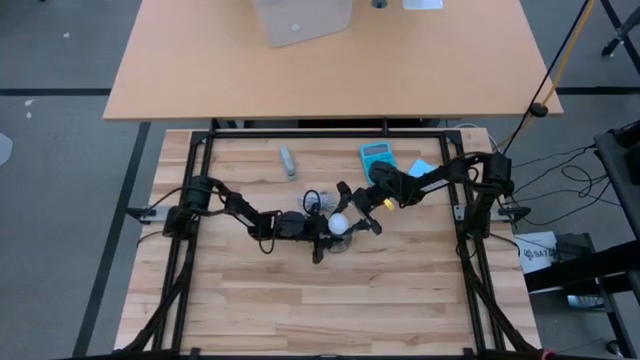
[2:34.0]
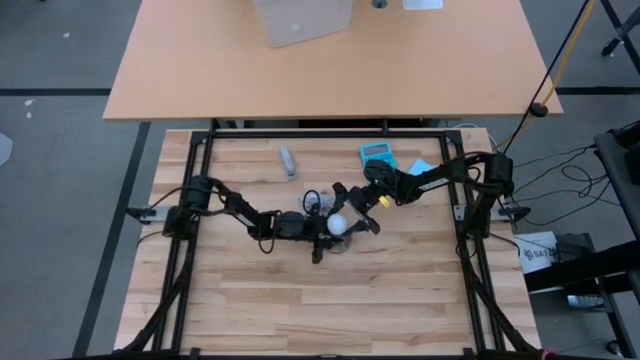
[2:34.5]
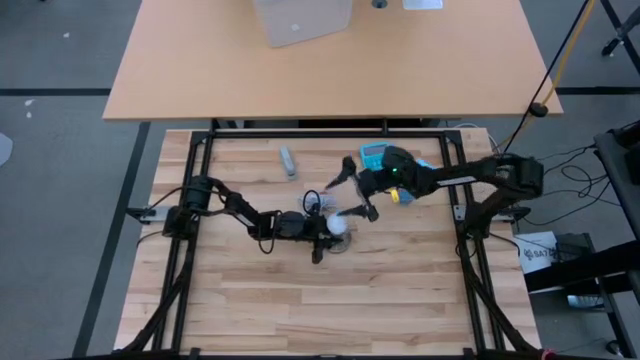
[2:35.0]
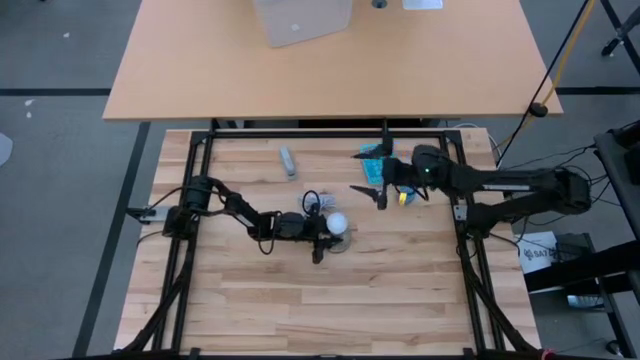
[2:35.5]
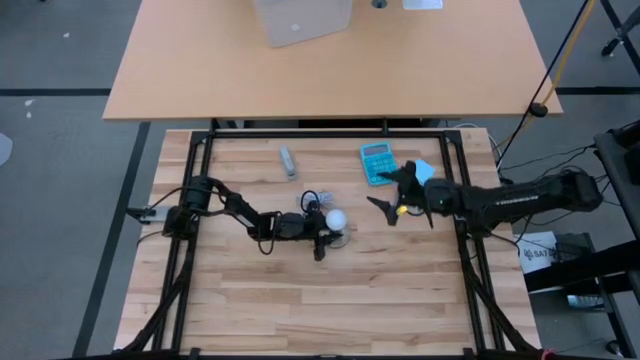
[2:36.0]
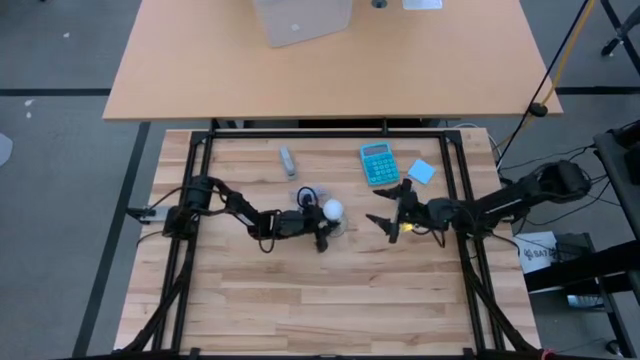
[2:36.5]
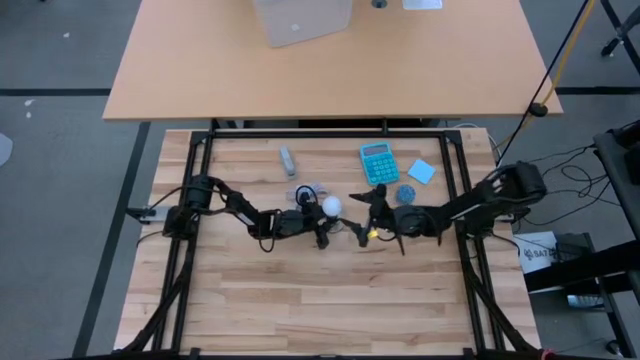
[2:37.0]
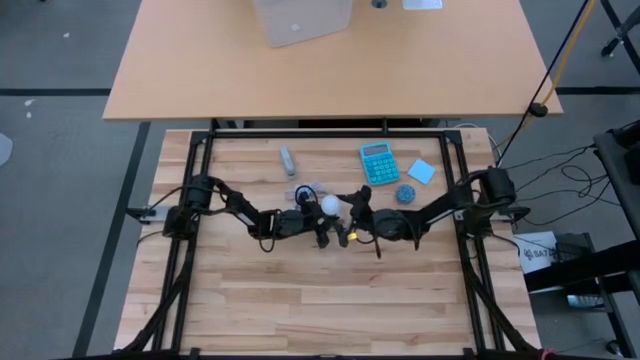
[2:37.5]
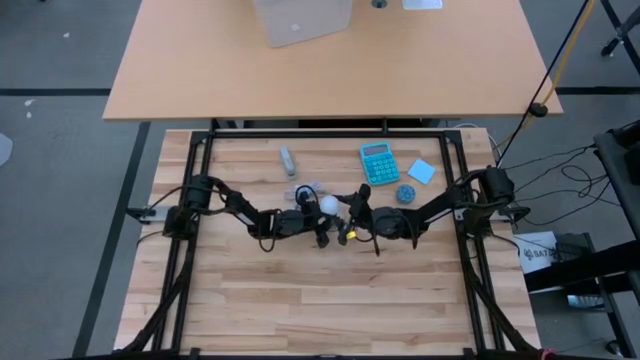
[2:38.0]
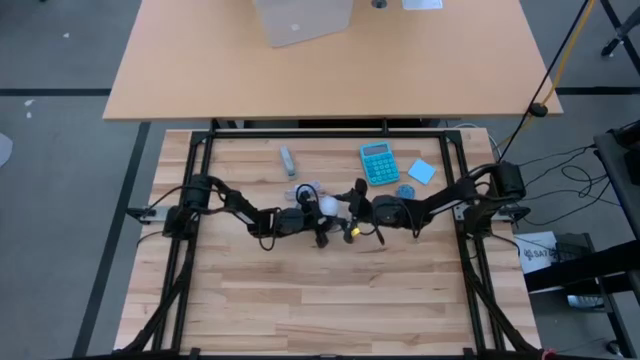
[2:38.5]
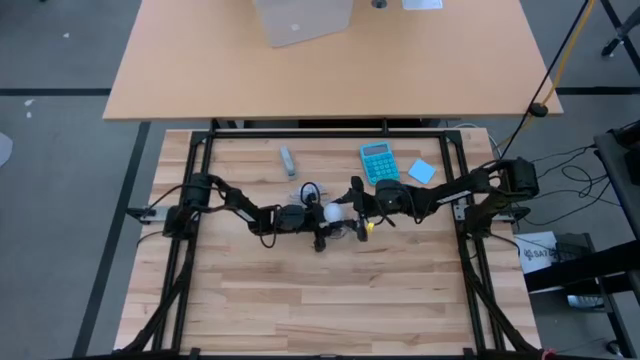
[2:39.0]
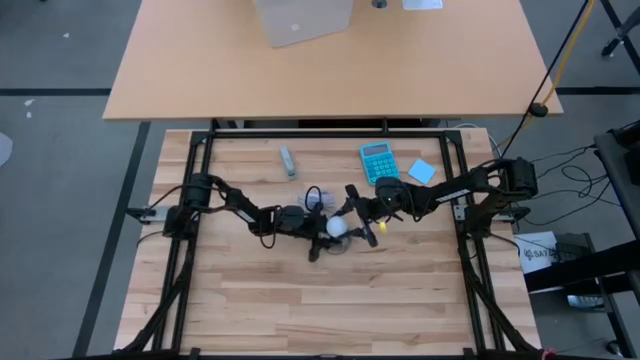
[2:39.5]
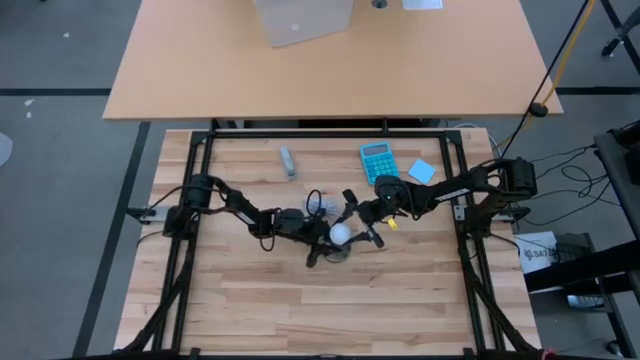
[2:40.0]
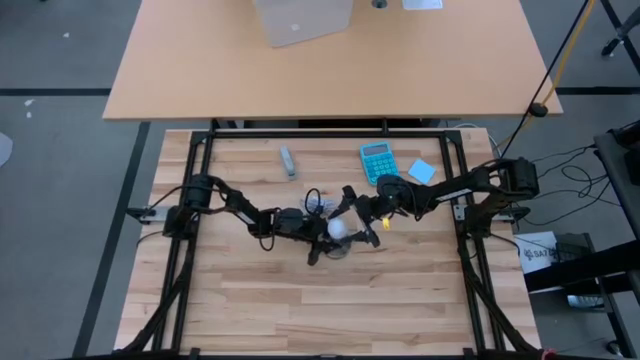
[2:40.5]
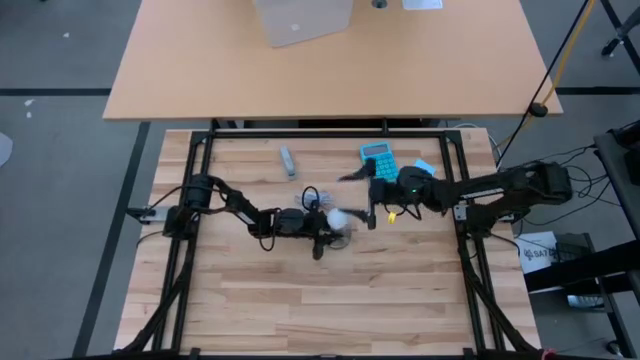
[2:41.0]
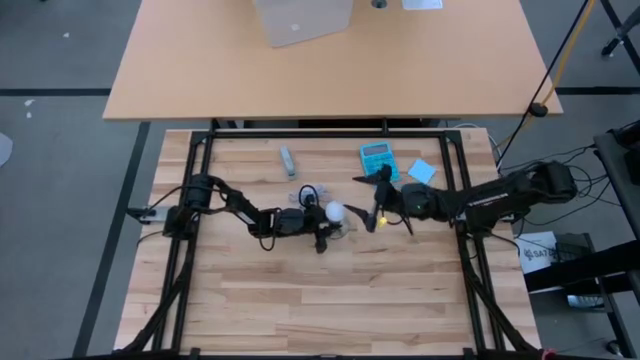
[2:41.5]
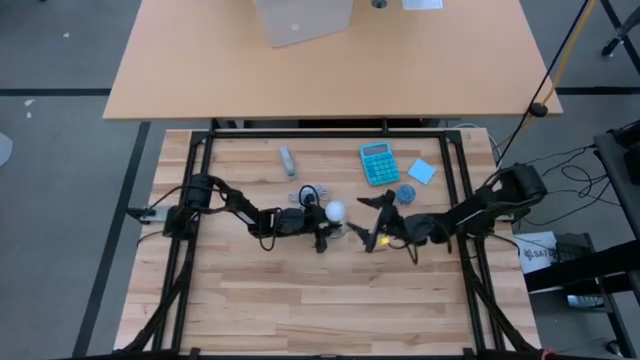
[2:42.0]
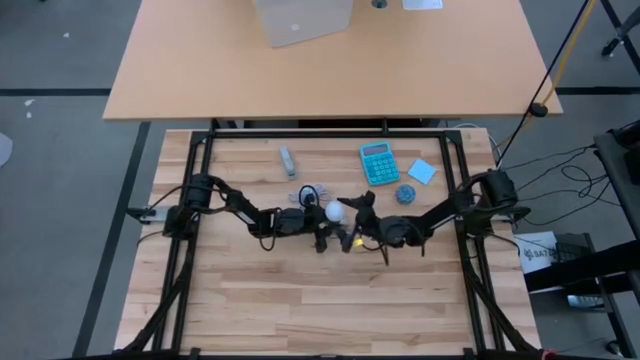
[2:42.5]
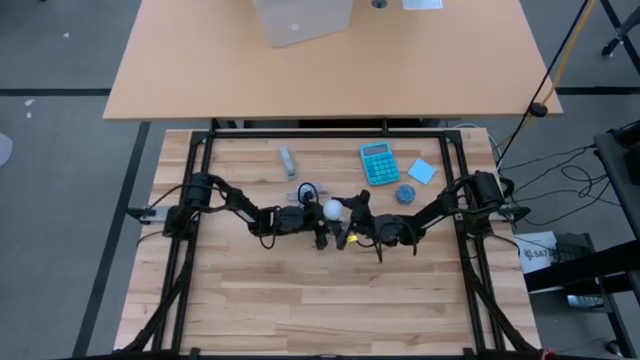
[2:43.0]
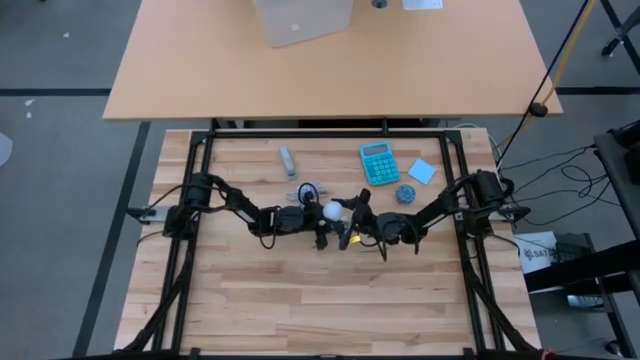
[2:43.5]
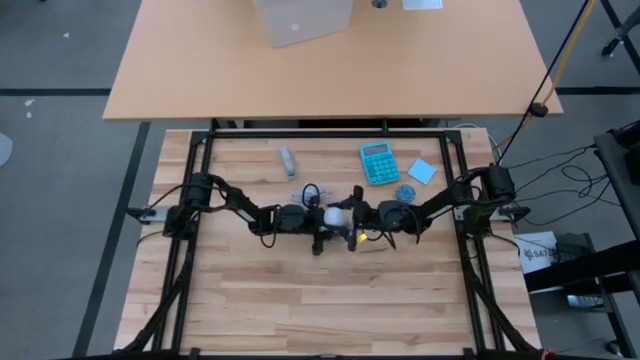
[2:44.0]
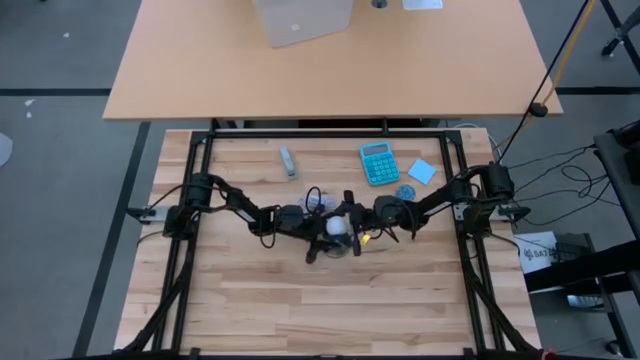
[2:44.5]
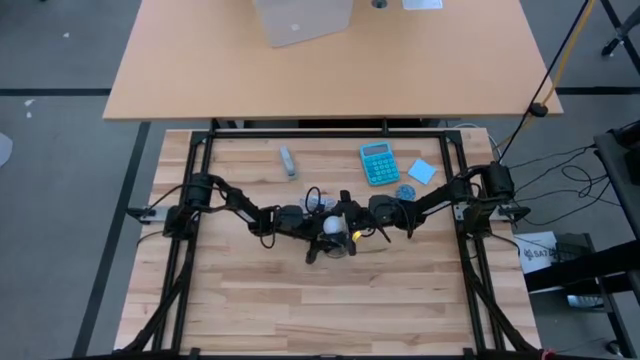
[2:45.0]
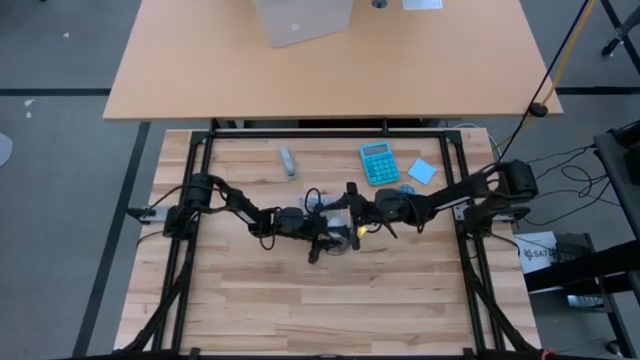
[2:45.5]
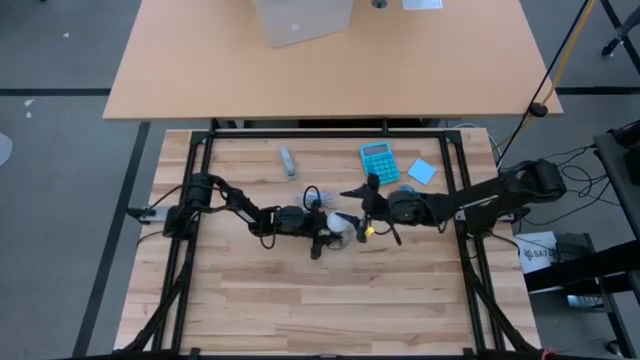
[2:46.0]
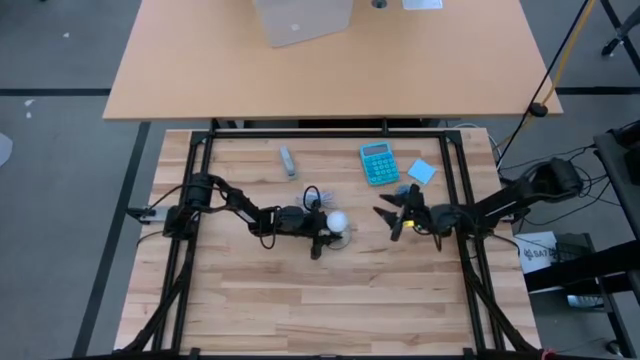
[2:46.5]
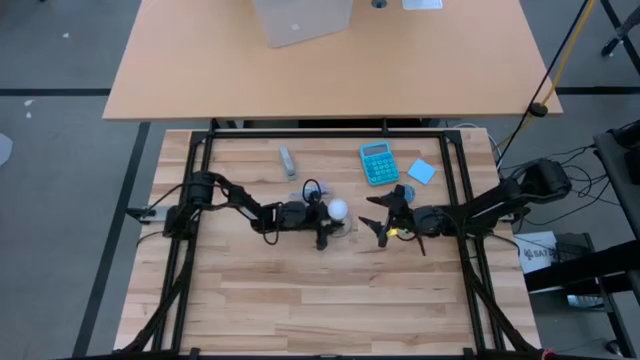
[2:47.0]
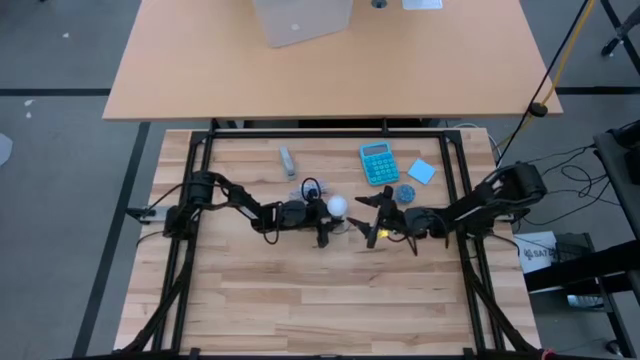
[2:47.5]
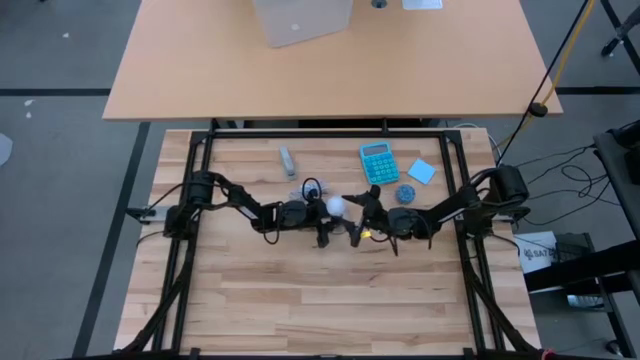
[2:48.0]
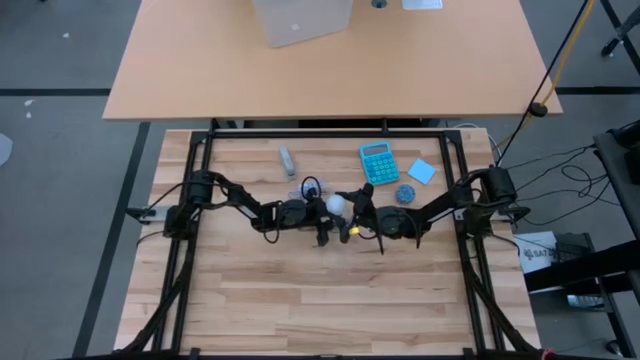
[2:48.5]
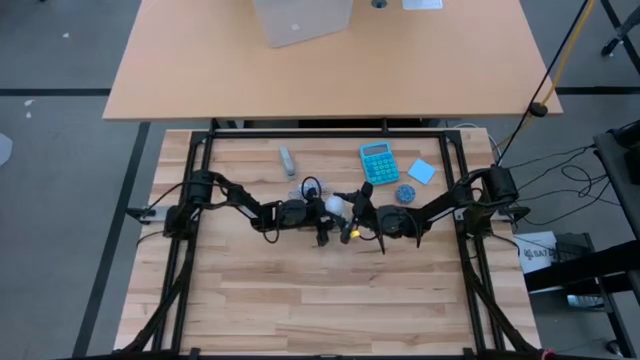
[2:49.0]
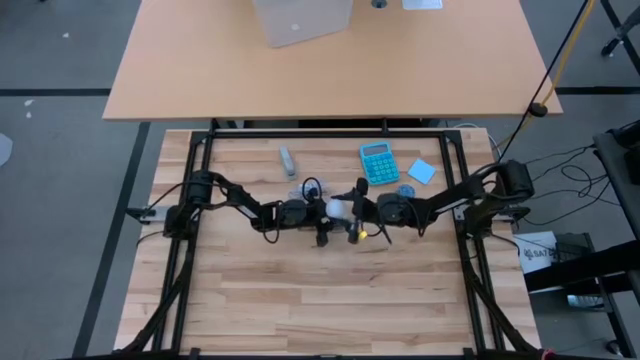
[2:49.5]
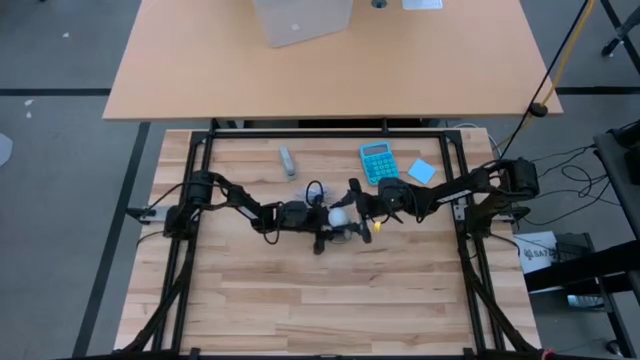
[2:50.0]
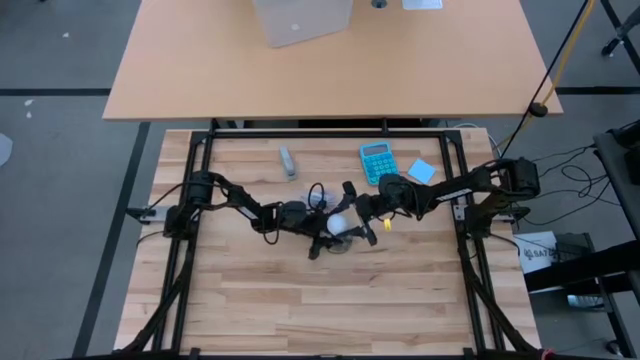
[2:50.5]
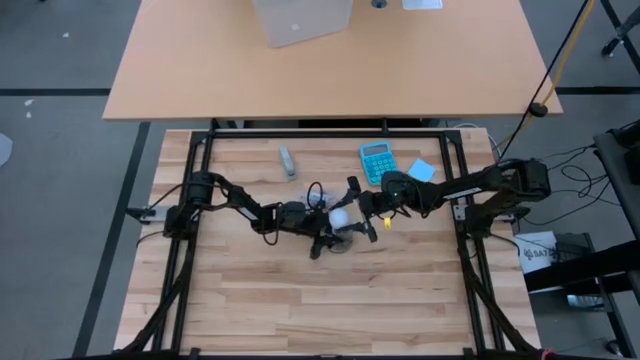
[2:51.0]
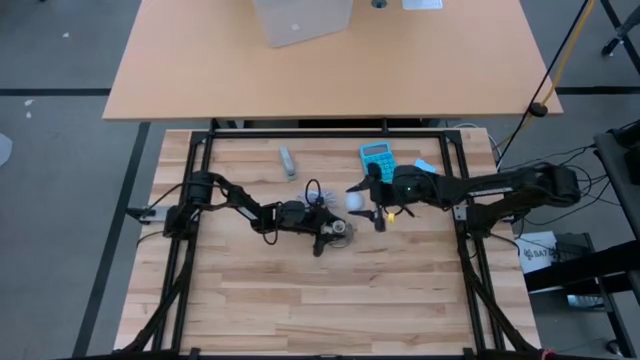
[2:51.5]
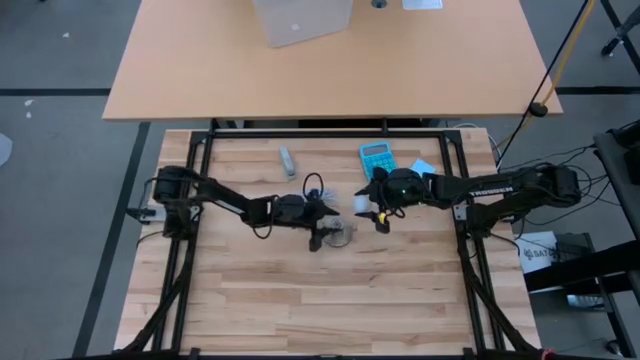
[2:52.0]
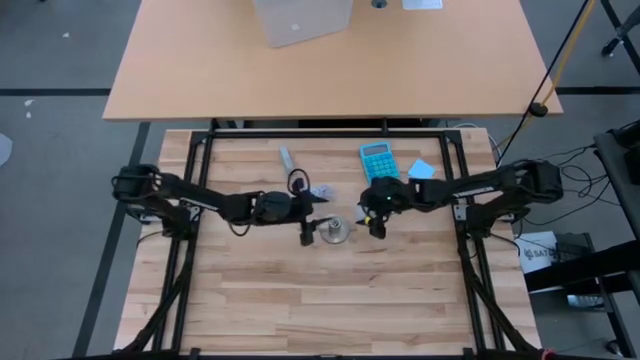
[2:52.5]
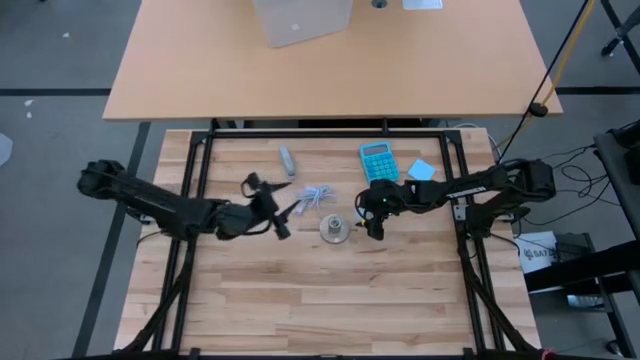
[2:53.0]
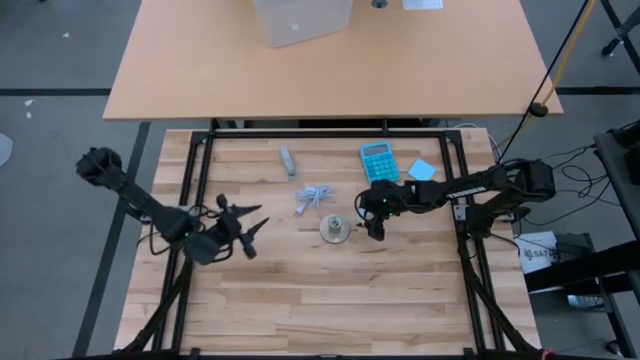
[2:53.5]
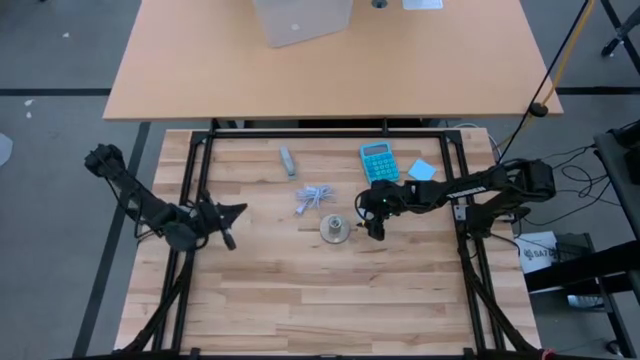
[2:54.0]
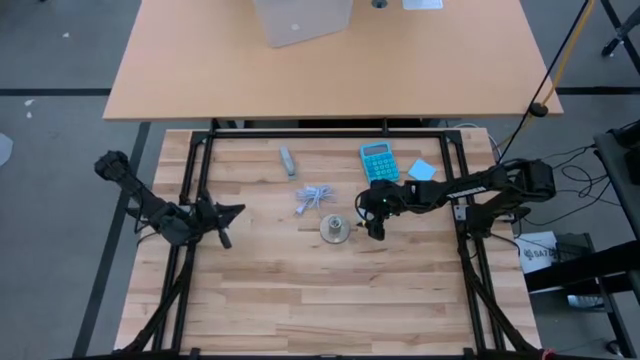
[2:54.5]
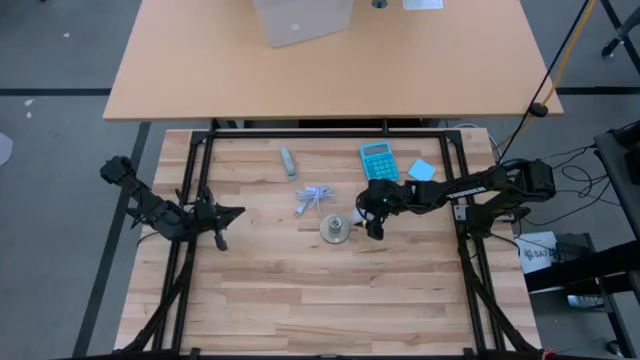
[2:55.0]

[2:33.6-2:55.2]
Task: Screw lightbulb
Remove the white lightbulb from the desk lamp
